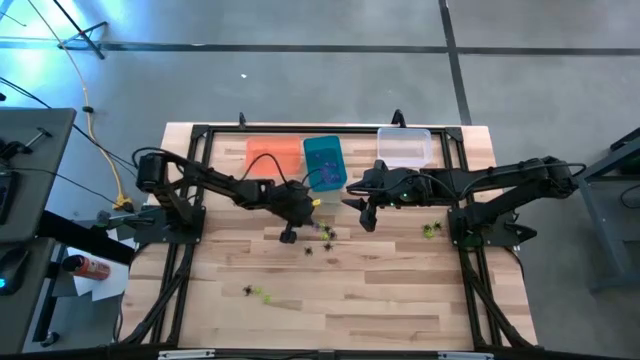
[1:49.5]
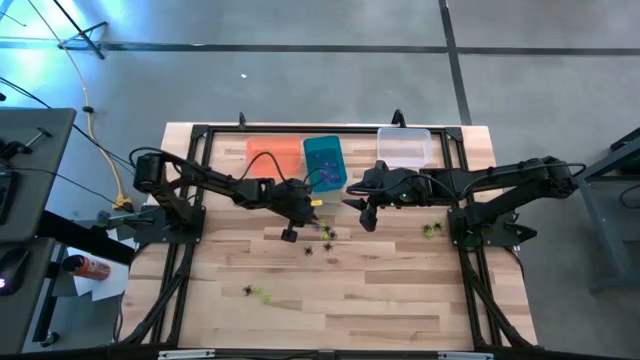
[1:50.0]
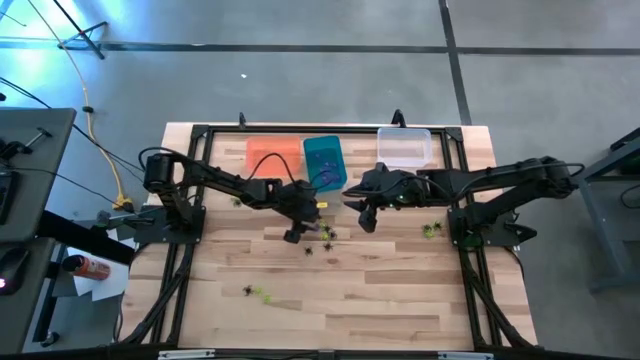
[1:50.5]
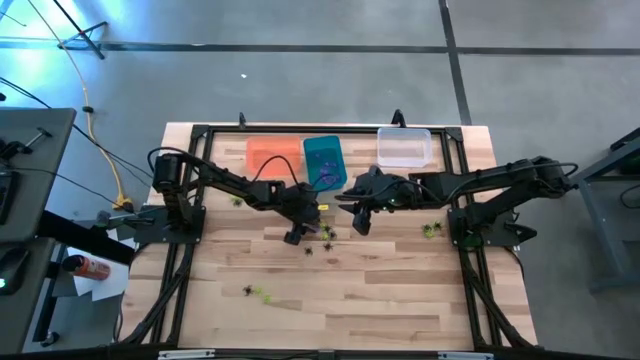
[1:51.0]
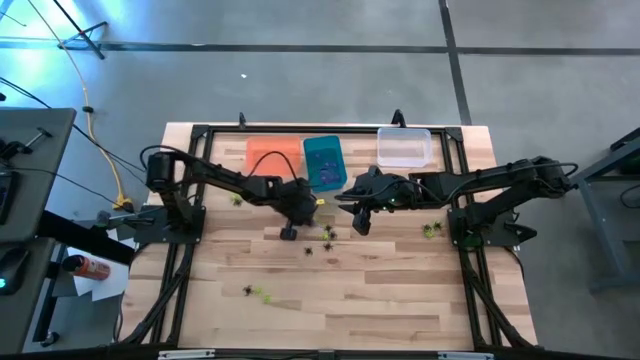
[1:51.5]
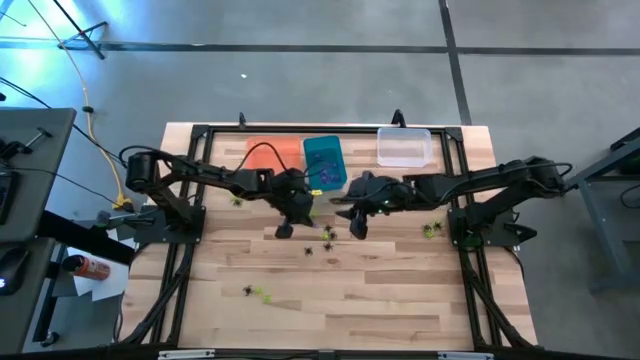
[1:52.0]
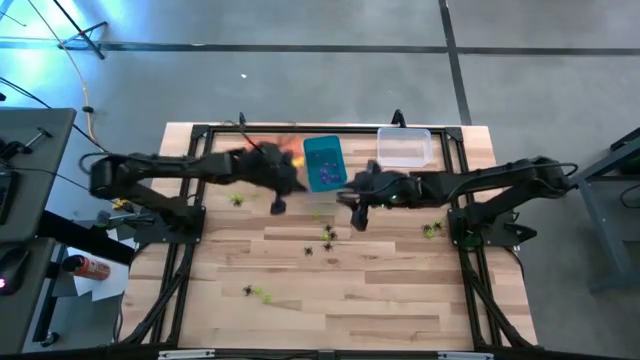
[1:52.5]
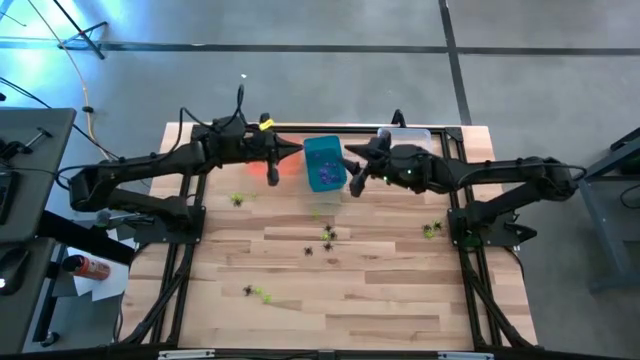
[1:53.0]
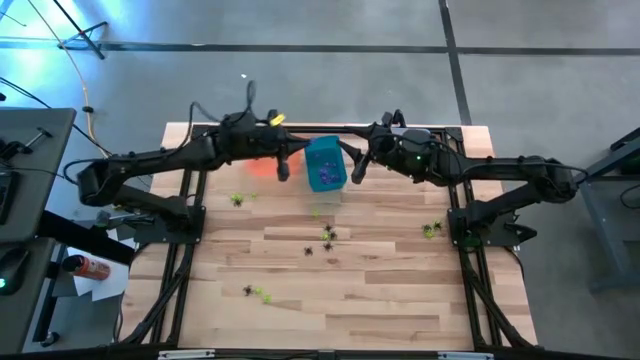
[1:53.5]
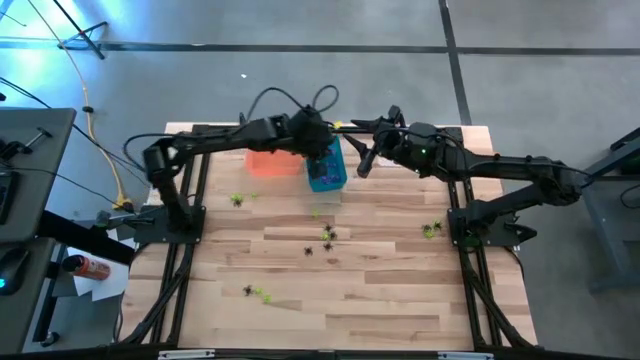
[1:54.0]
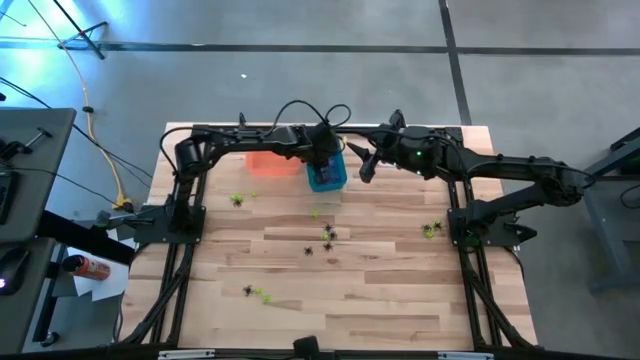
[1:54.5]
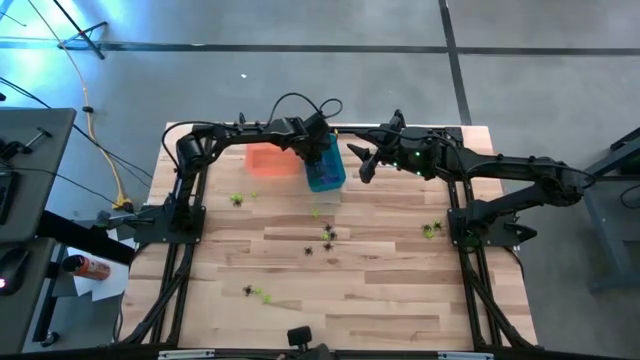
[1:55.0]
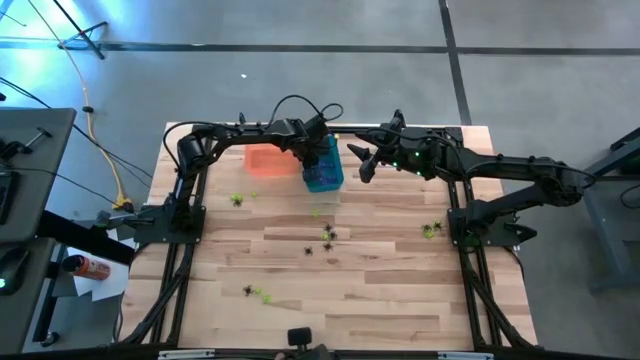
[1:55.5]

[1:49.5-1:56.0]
Task: Sort Halloween decoration
Put the purple spider toy into the blue bin

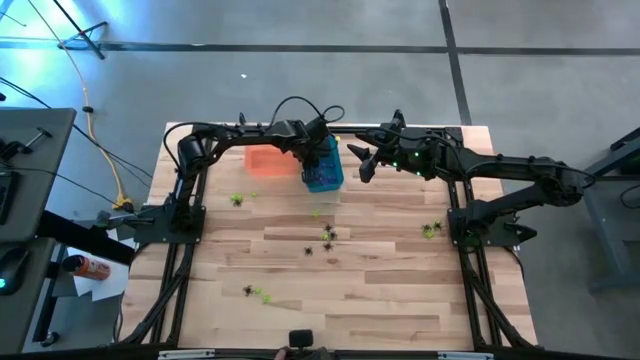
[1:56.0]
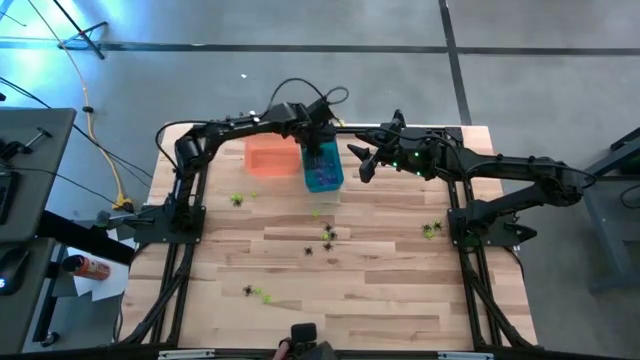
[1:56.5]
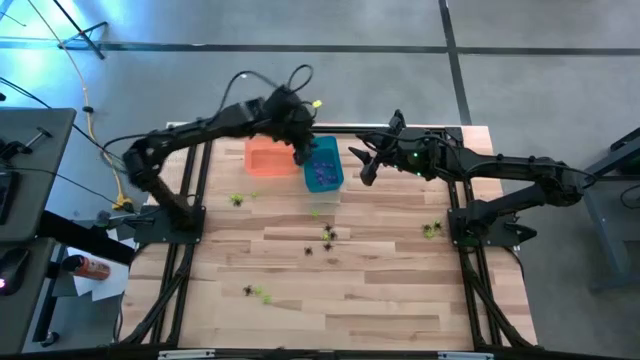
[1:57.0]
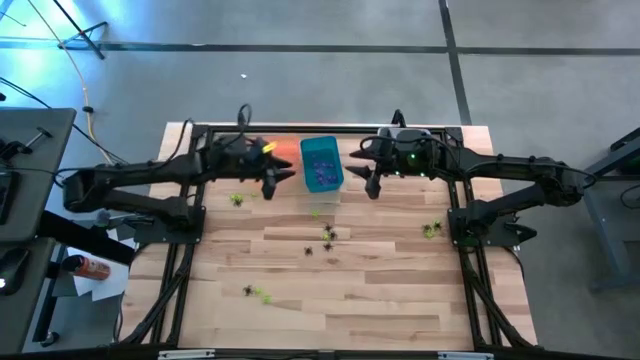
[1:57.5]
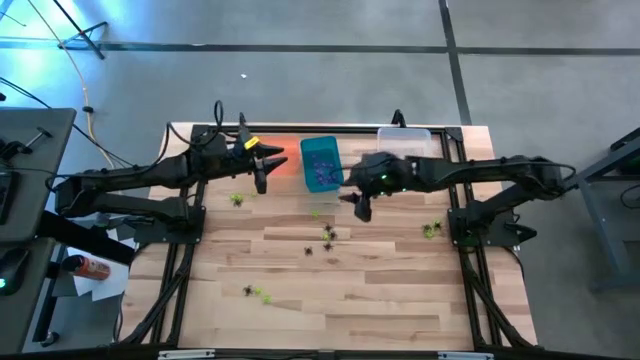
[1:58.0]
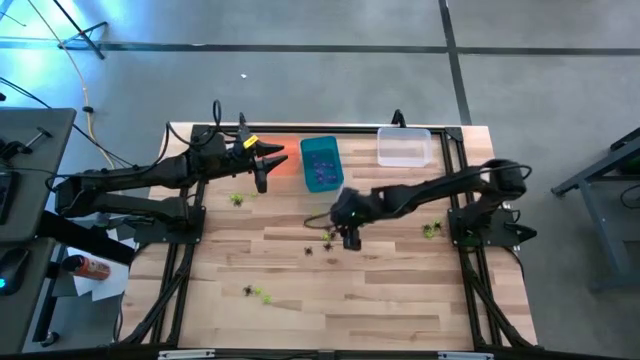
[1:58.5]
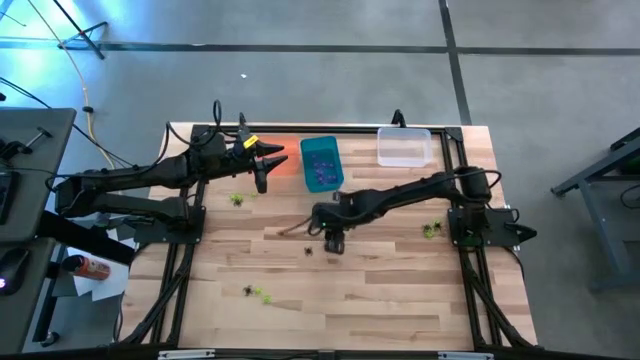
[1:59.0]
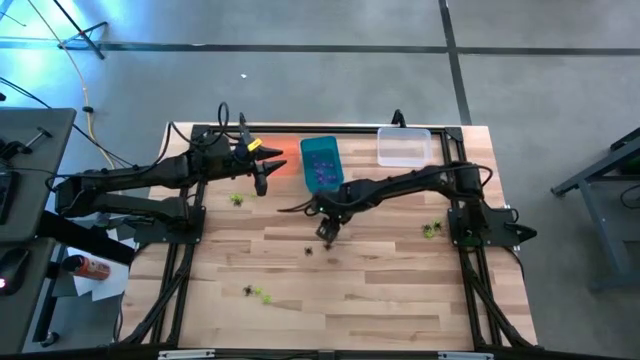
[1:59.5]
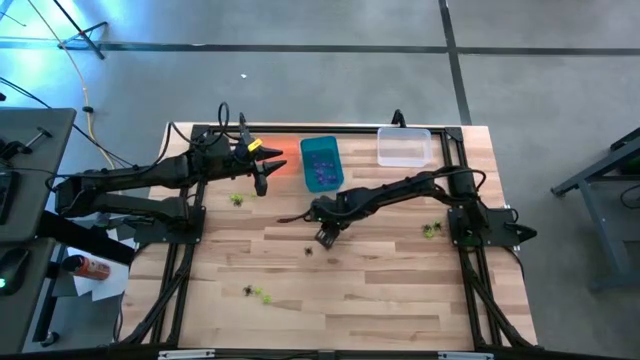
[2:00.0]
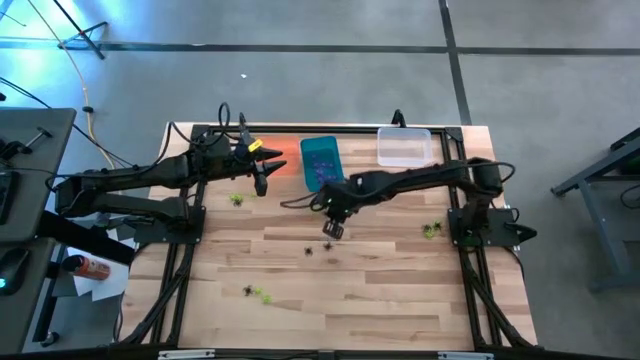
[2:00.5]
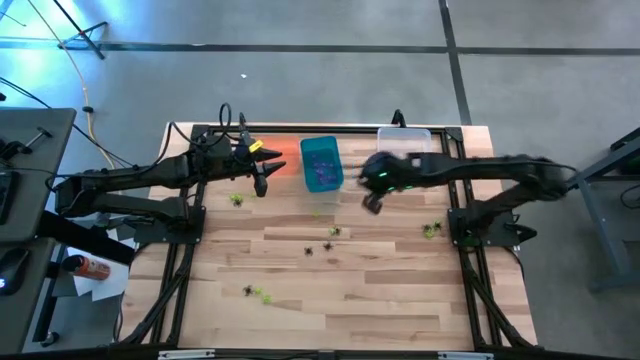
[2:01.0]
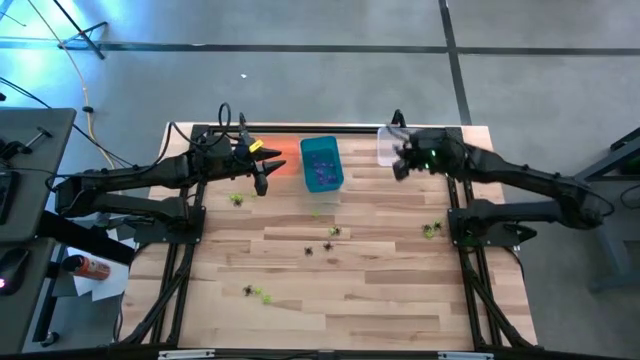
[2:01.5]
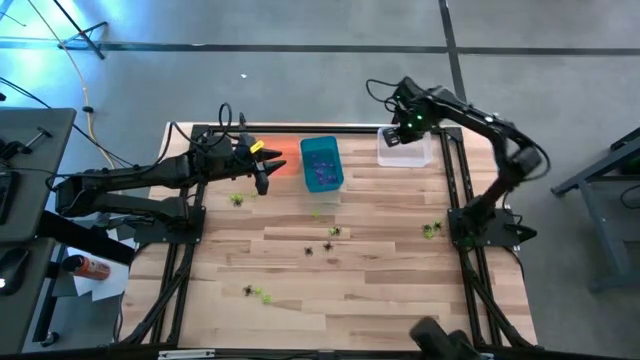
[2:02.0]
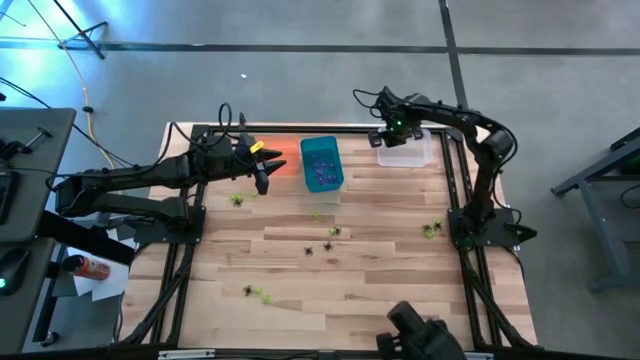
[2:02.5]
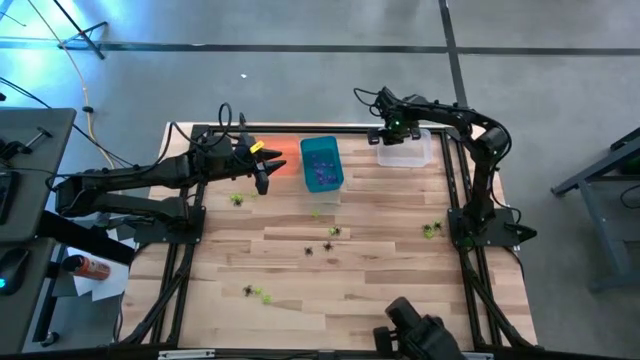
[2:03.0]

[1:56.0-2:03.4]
Put the black spider toy into the transparent bin

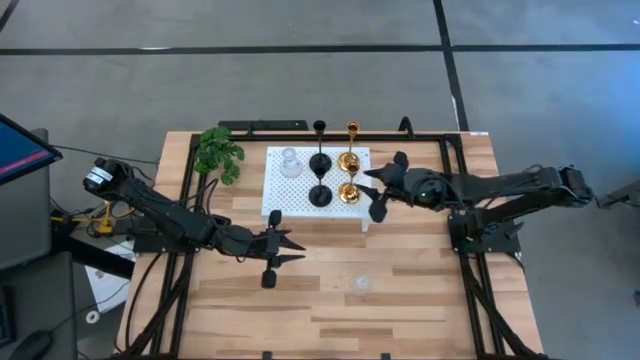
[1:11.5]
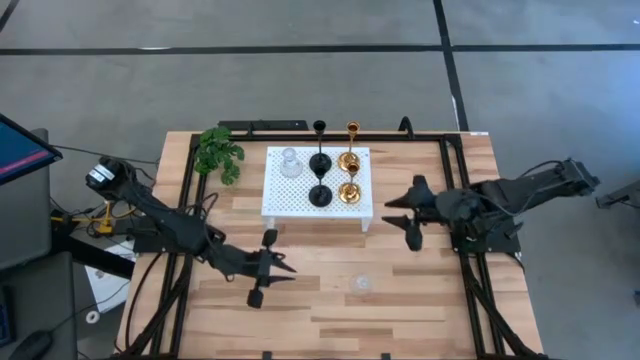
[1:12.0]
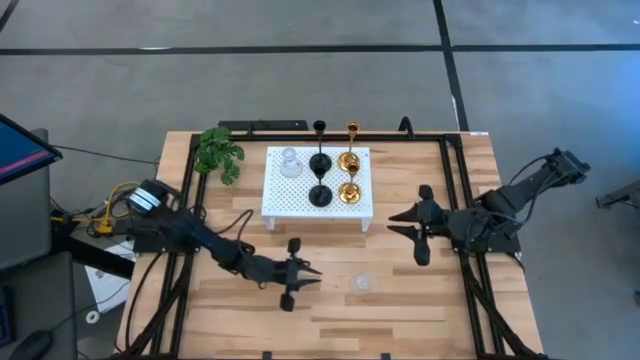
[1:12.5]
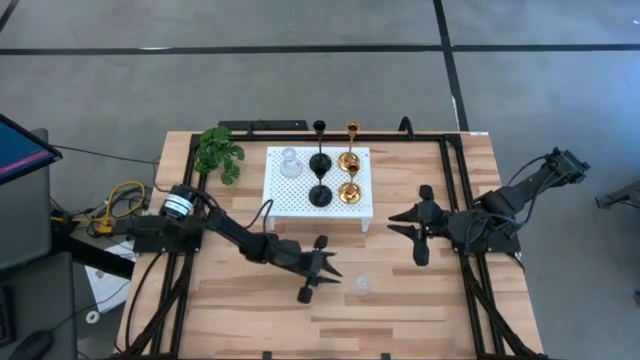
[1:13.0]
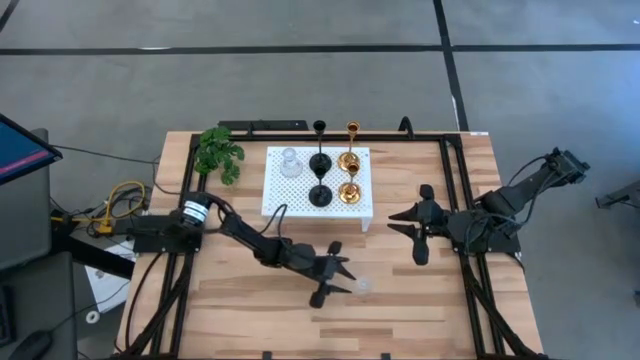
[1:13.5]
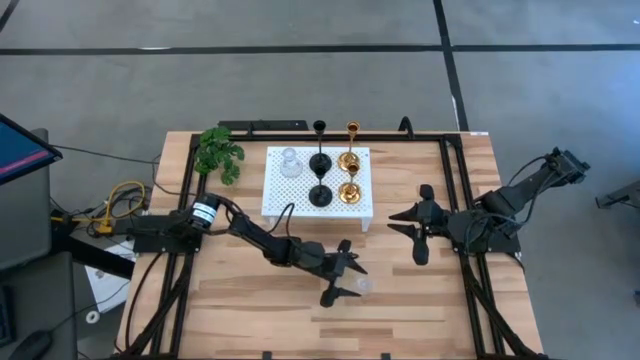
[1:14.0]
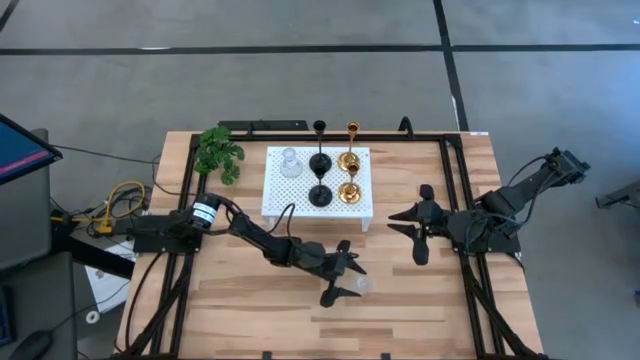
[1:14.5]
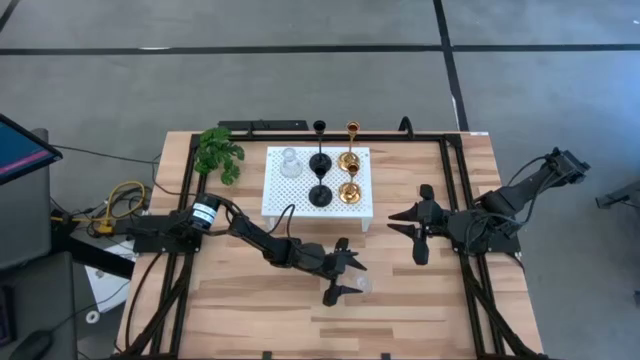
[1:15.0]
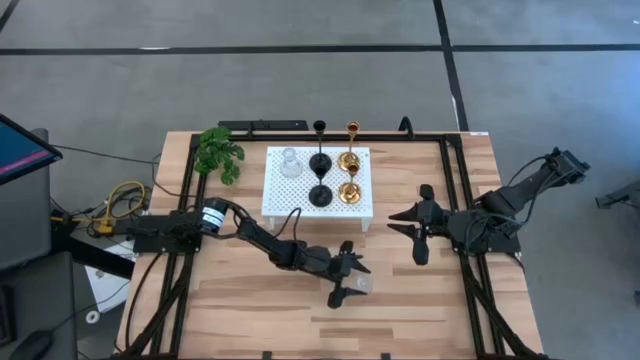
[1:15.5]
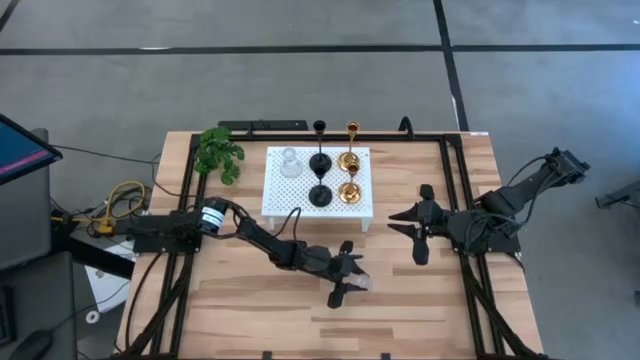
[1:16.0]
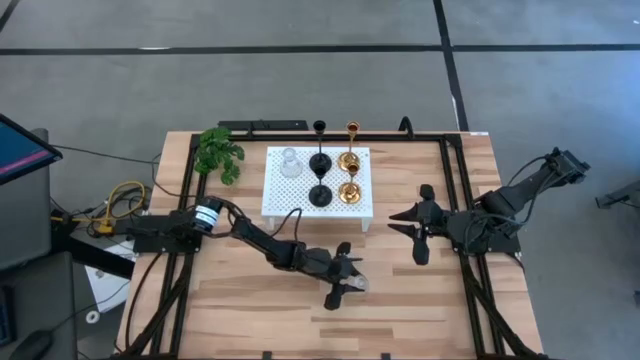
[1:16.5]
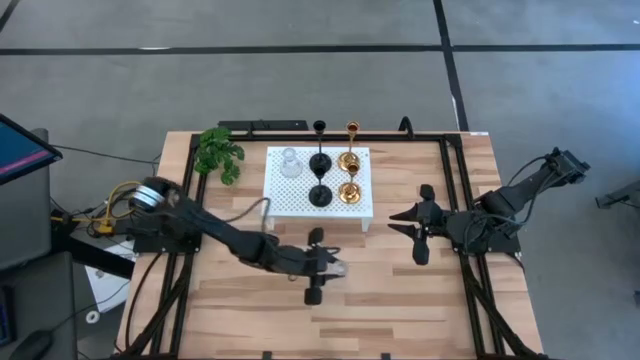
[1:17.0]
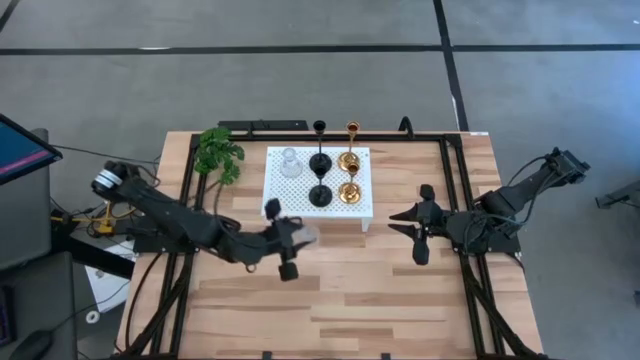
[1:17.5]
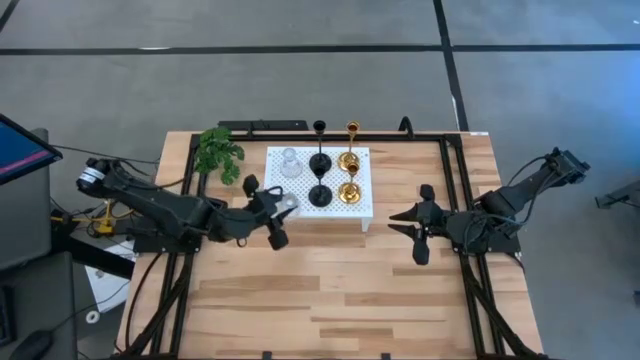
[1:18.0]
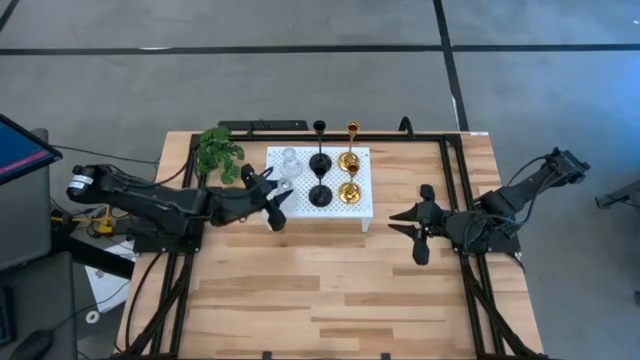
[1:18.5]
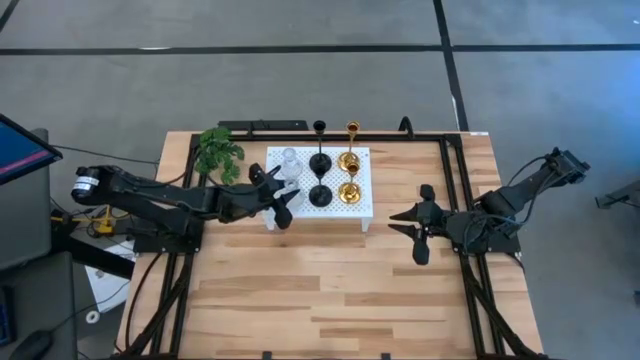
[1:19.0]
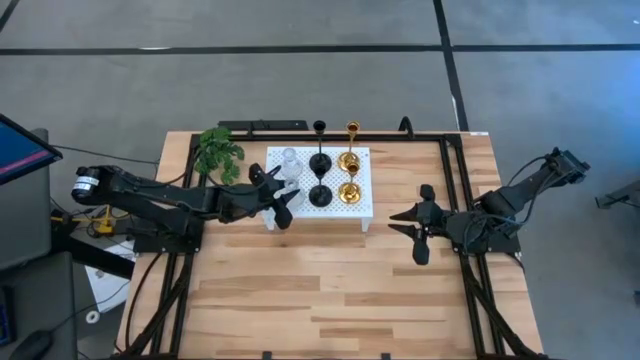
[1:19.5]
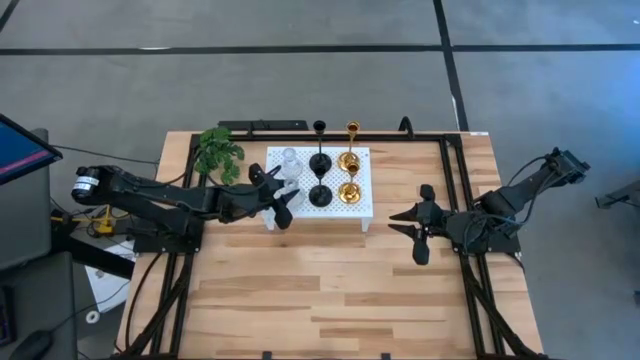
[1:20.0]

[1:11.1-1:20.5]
Task: Pick & Place candle stick holders
Put the glass candle holder aligned with the other glass candle holder on the shelf
